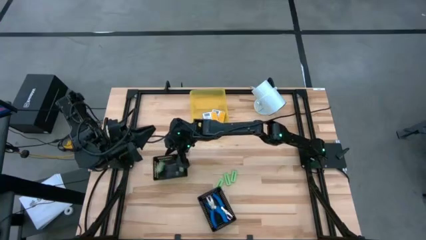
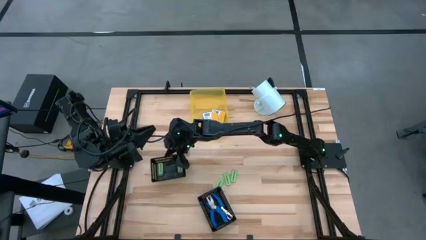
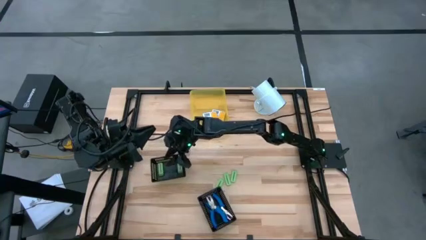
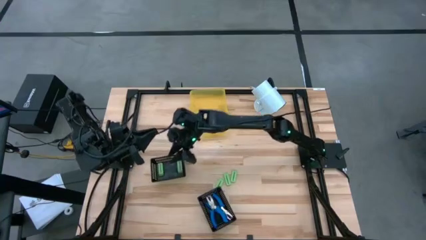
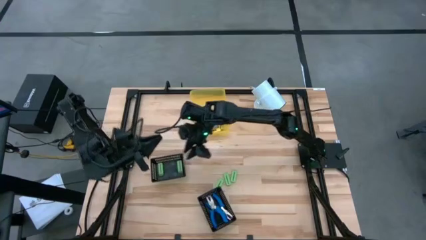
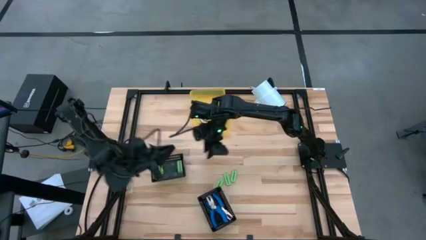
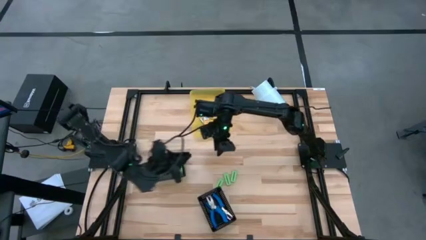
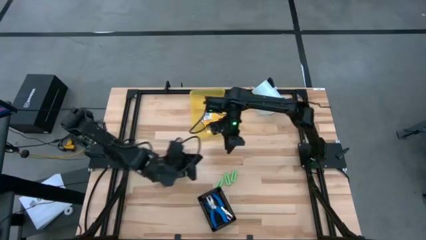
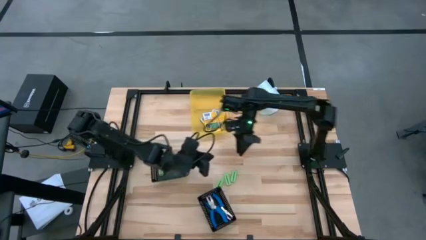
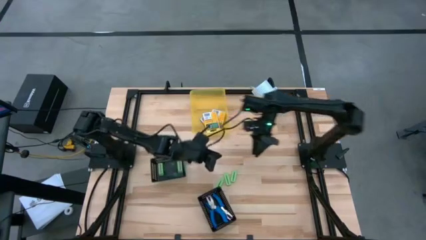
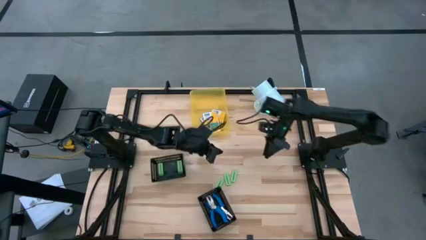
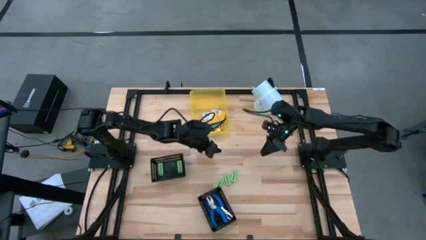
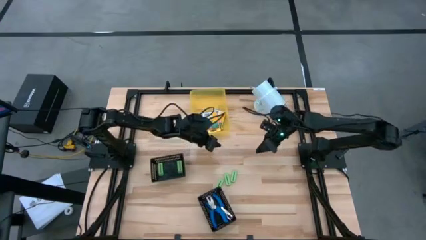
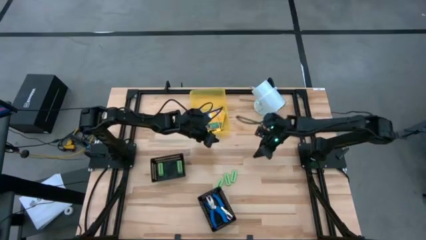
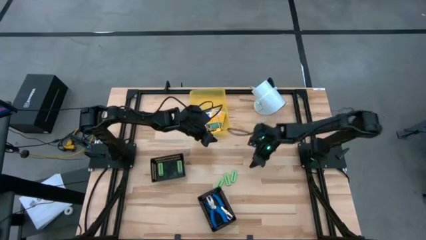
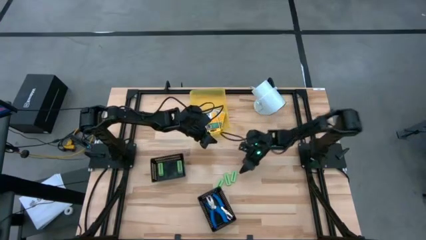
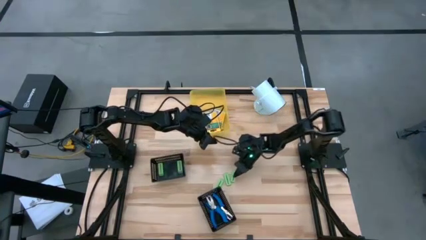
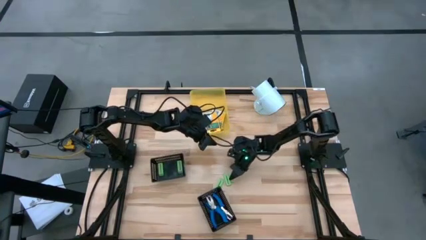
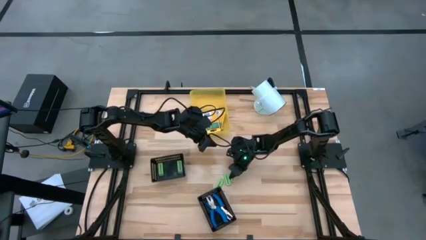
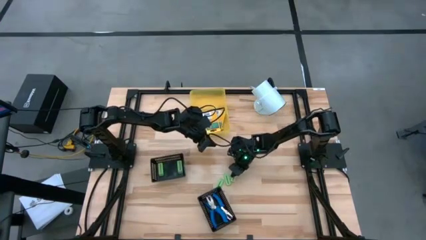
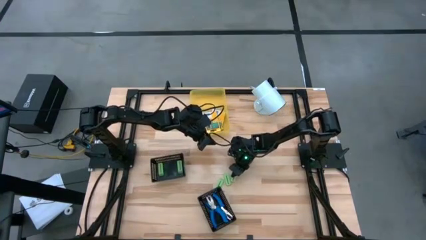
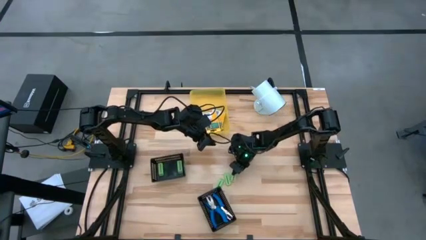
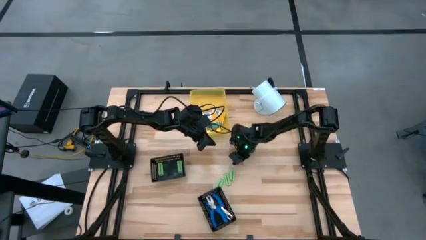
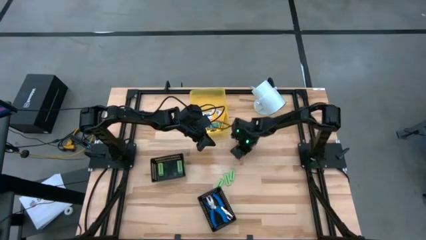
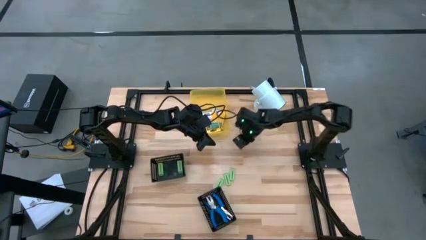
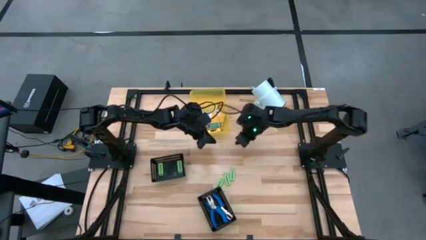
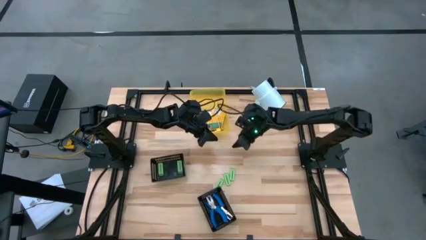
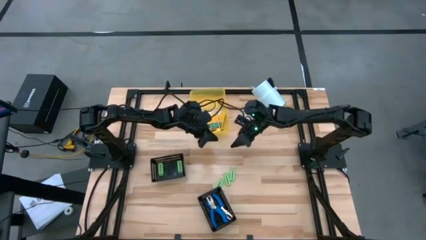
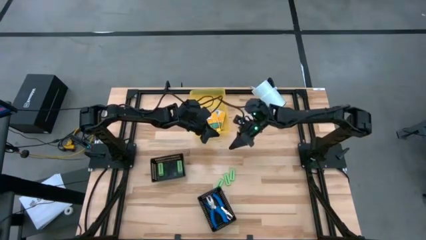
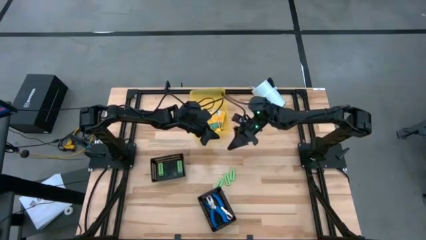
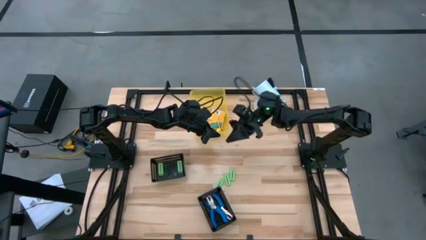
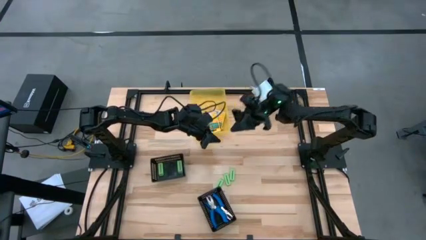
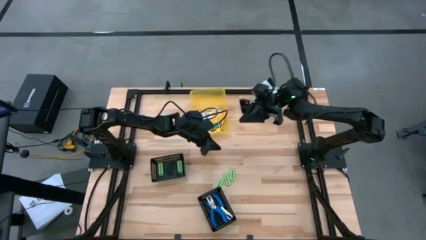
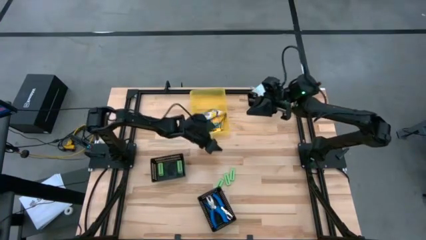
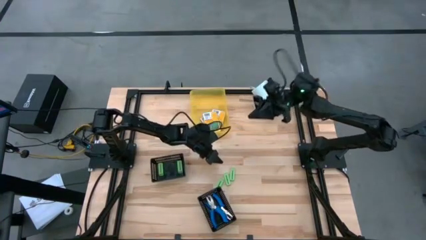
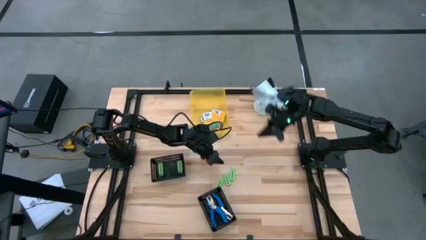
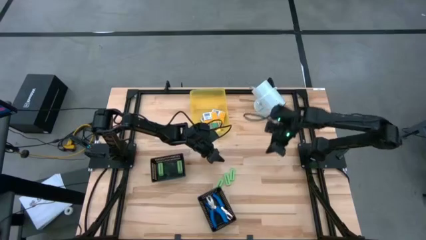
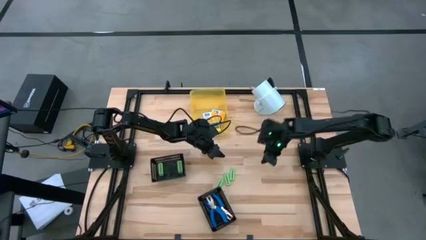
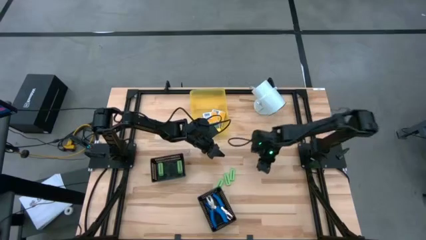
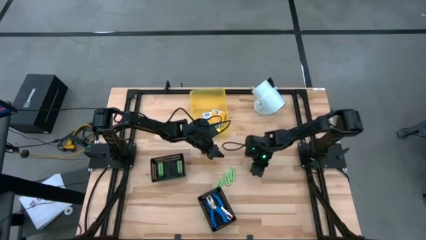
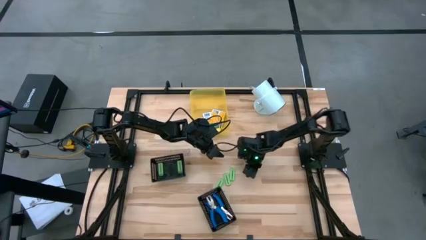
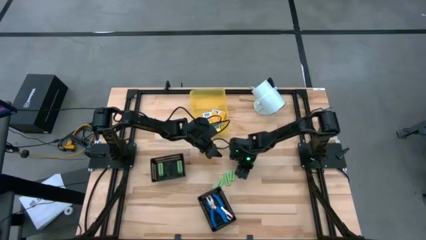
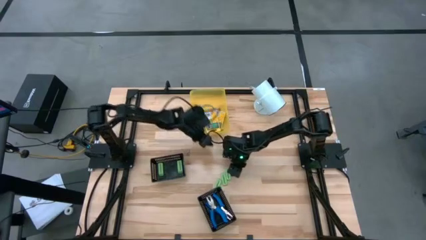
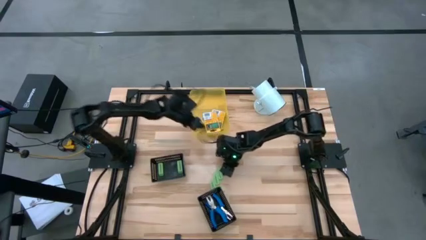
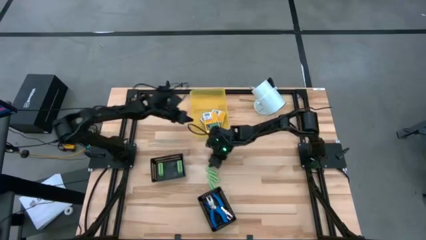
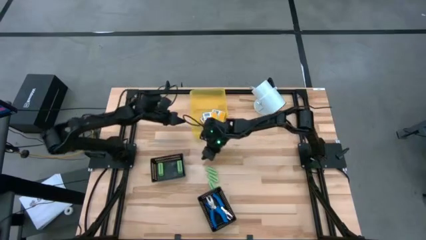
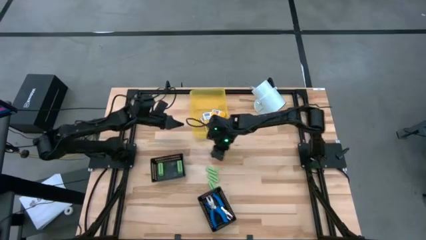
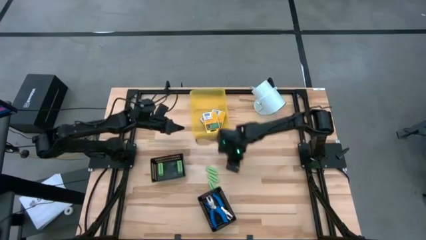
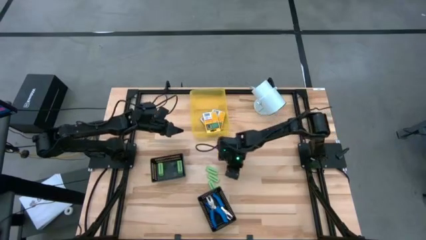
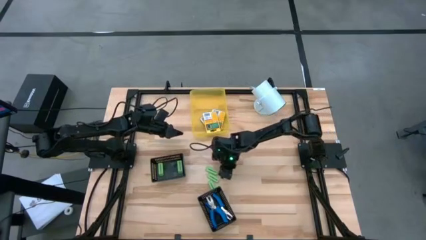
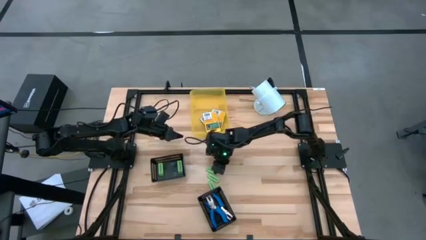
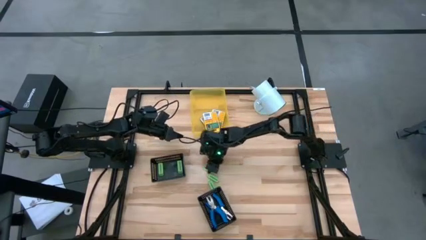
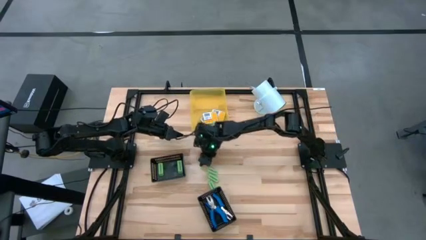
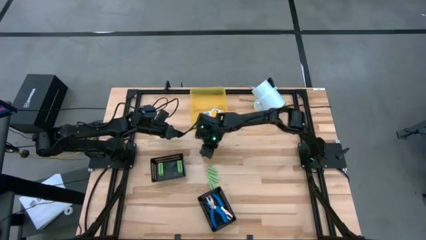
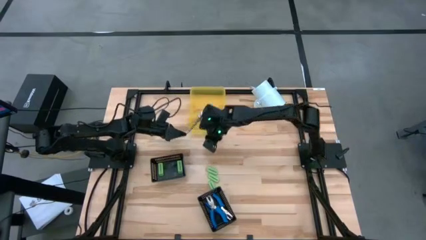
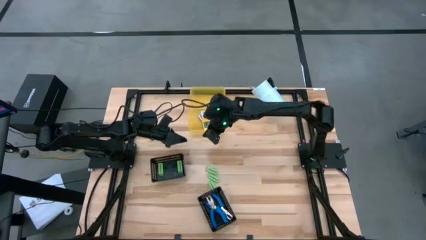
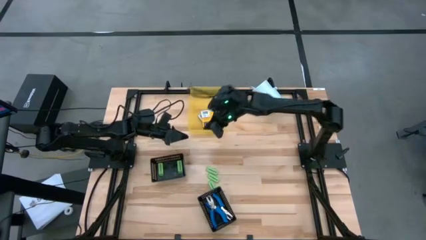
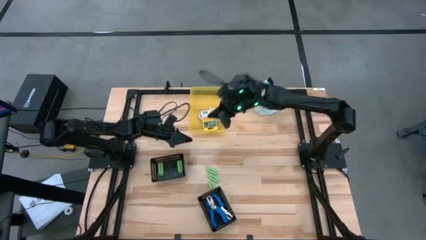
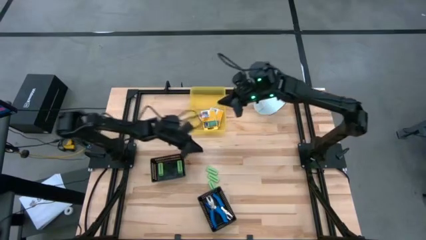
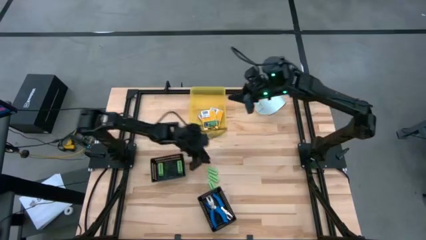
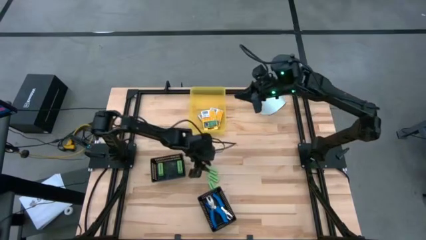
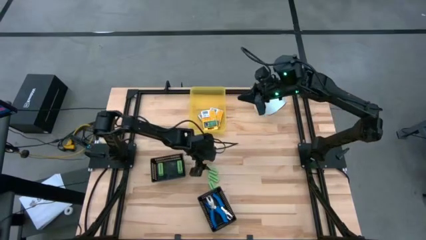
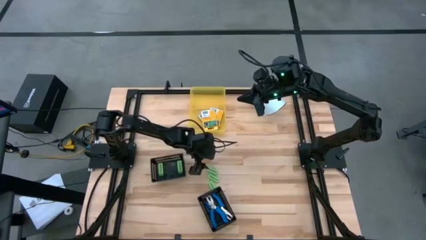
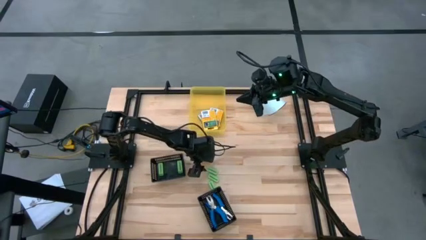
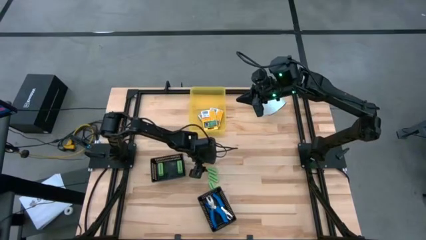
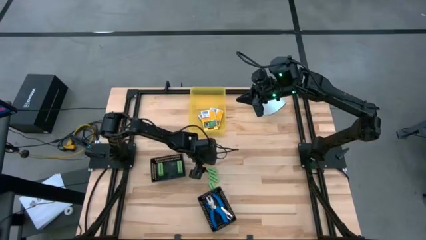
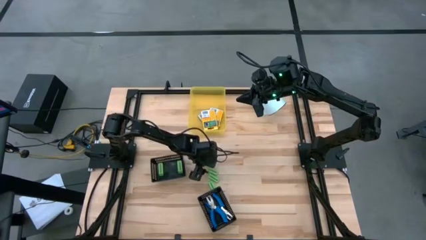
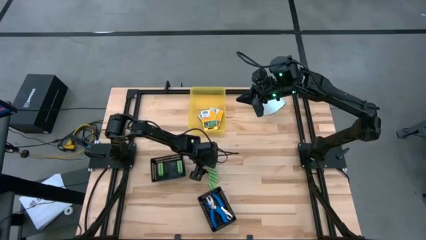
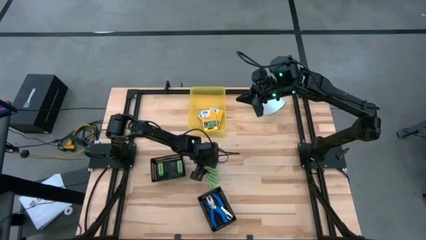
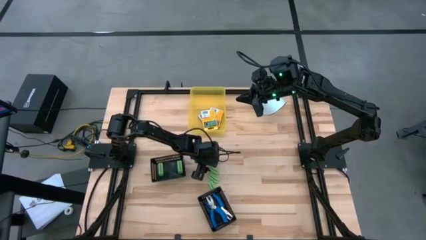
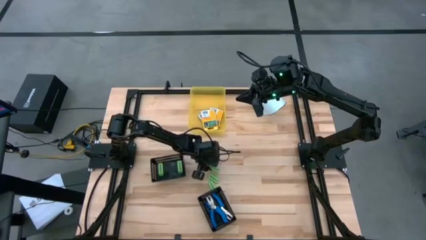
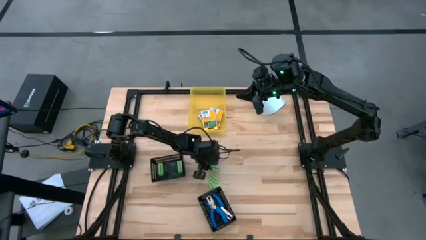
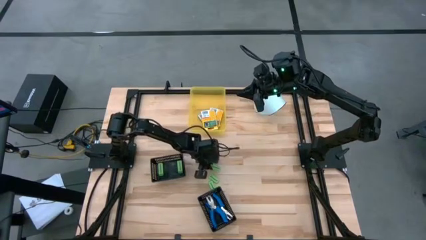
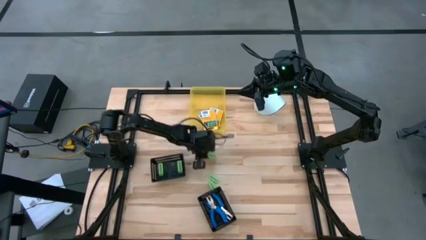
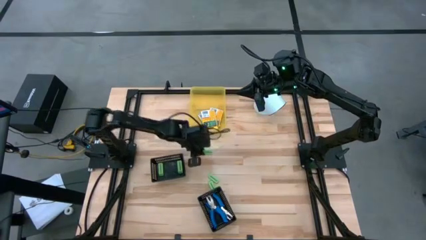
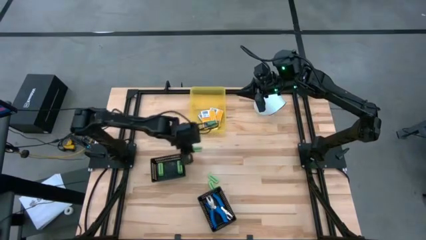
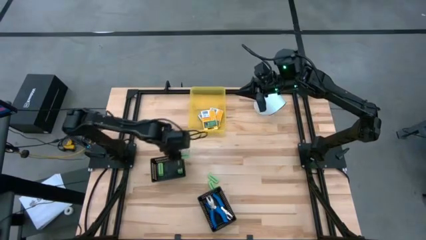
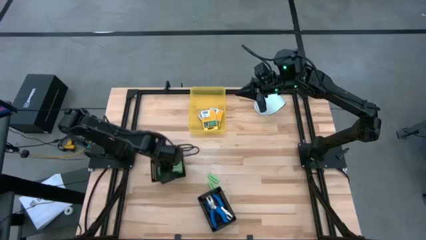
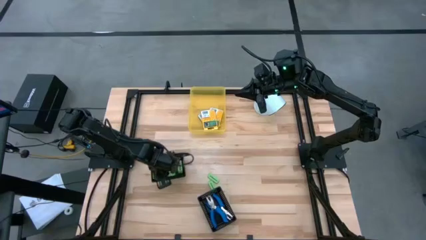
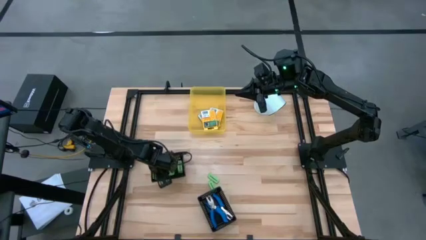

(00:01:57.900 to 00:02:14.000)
Task: Pick & Place School Supplies
Put the green eraser into the left black bin
